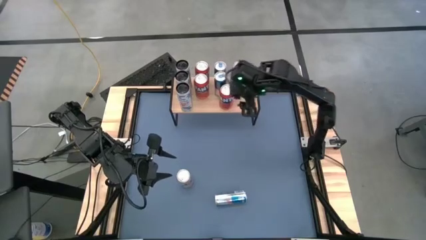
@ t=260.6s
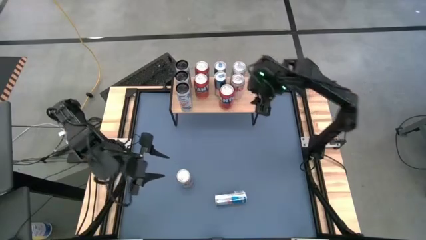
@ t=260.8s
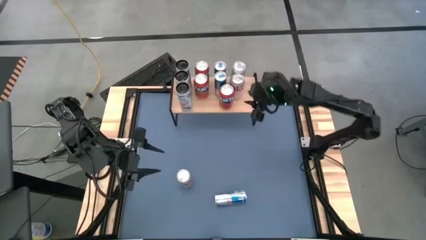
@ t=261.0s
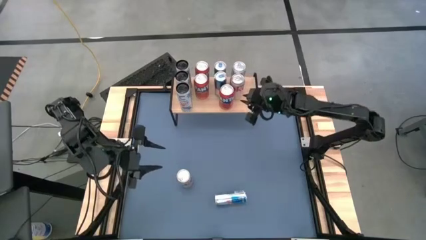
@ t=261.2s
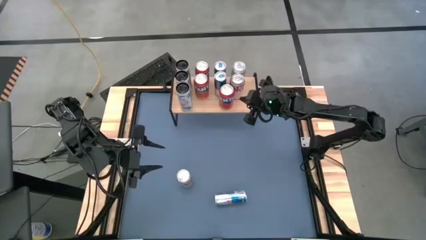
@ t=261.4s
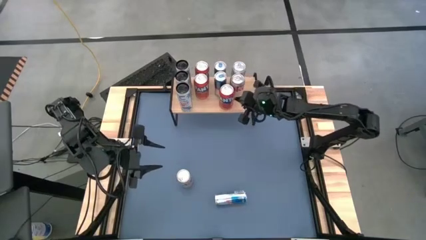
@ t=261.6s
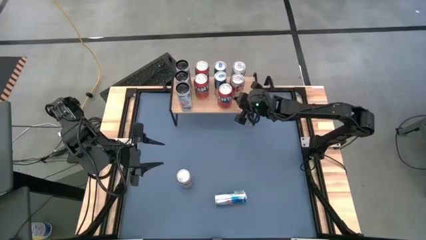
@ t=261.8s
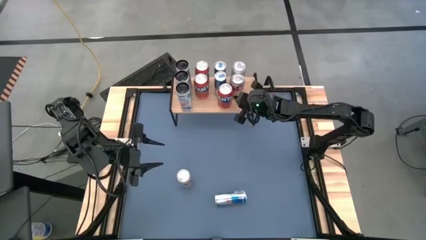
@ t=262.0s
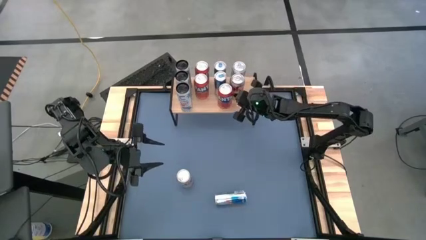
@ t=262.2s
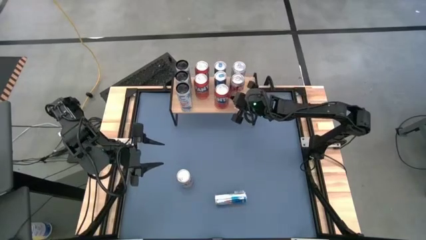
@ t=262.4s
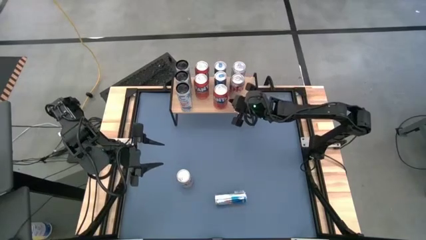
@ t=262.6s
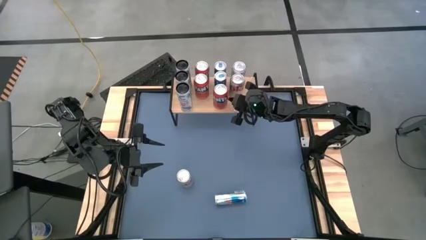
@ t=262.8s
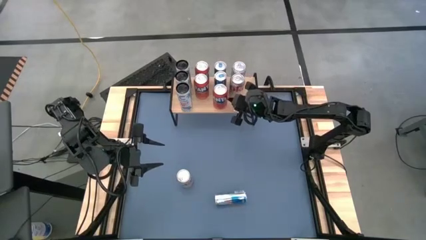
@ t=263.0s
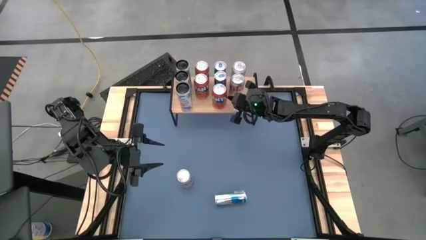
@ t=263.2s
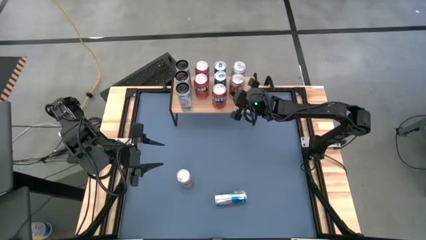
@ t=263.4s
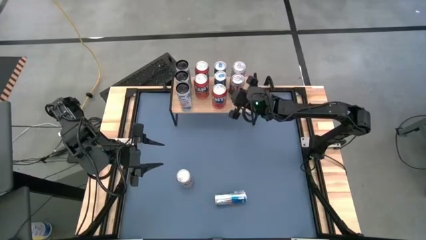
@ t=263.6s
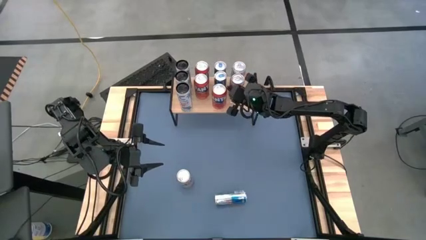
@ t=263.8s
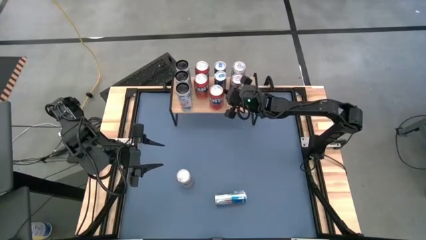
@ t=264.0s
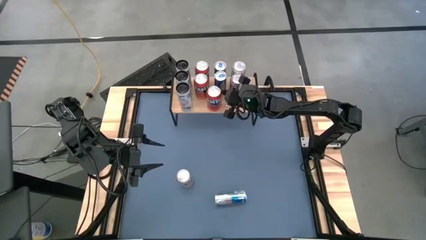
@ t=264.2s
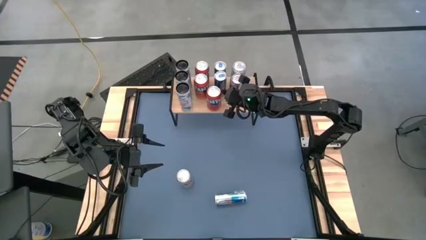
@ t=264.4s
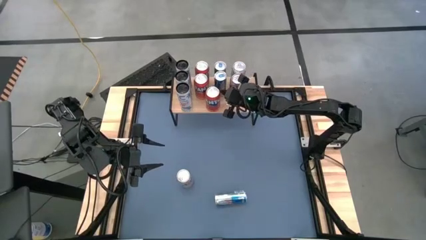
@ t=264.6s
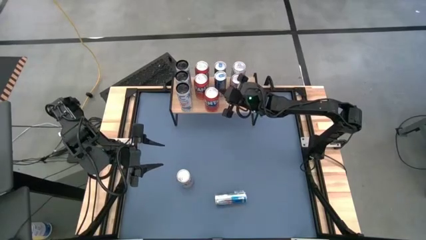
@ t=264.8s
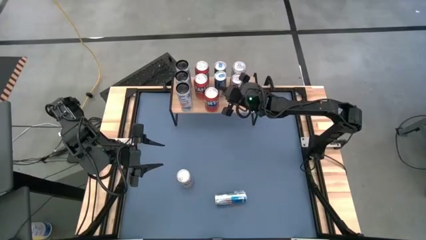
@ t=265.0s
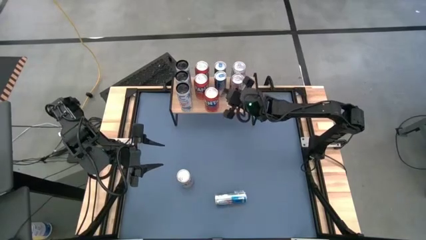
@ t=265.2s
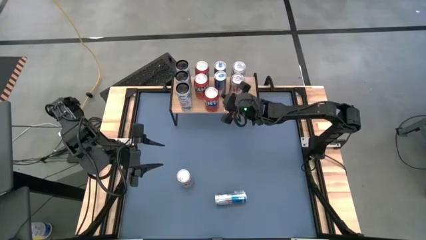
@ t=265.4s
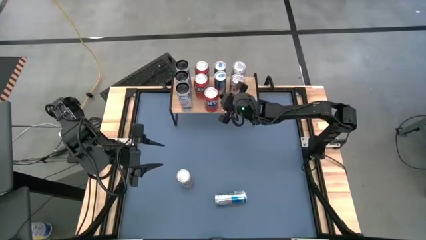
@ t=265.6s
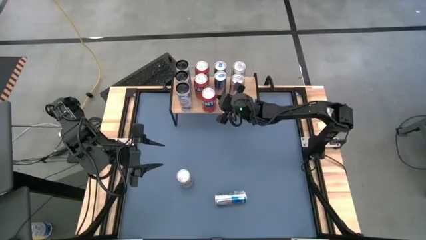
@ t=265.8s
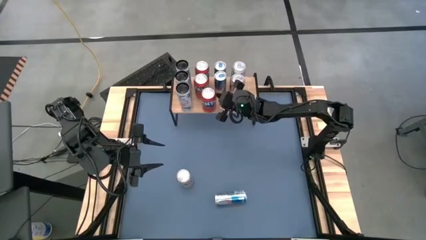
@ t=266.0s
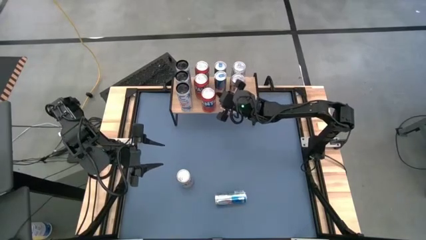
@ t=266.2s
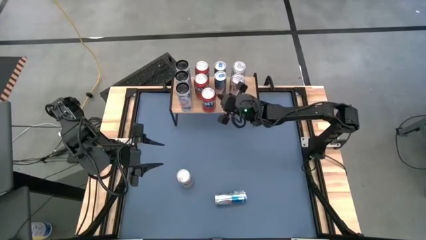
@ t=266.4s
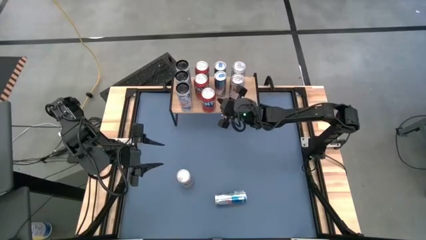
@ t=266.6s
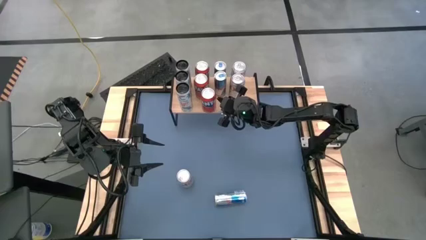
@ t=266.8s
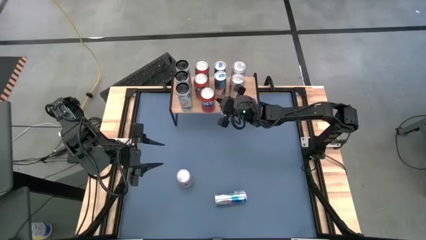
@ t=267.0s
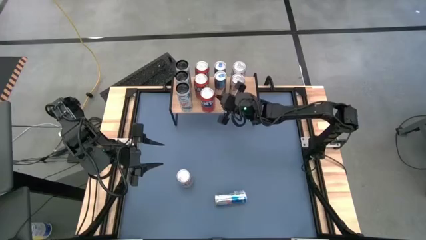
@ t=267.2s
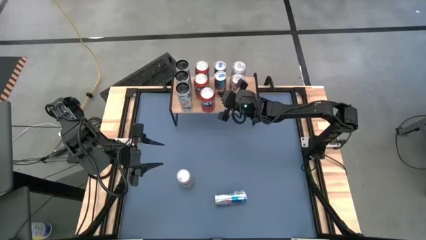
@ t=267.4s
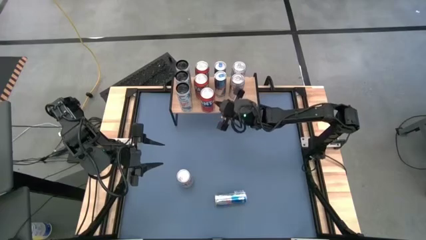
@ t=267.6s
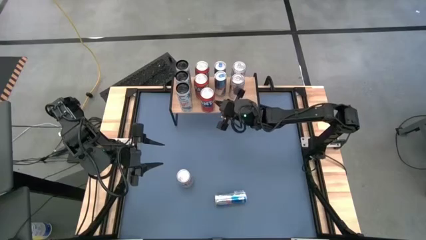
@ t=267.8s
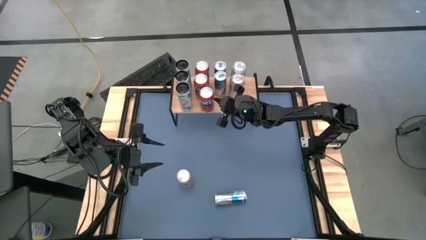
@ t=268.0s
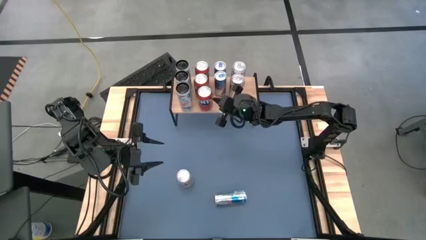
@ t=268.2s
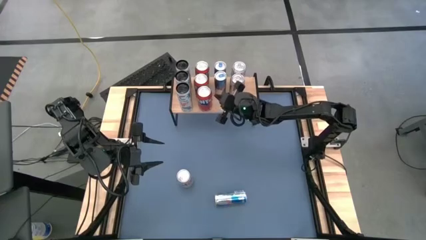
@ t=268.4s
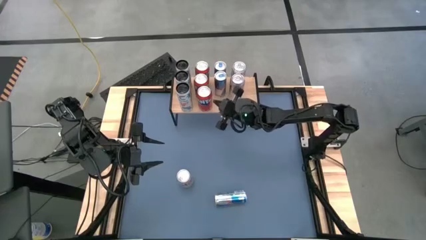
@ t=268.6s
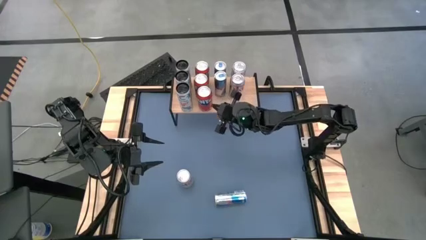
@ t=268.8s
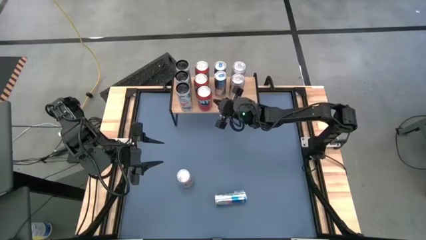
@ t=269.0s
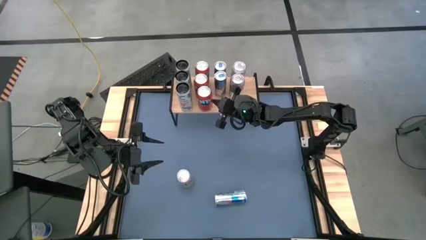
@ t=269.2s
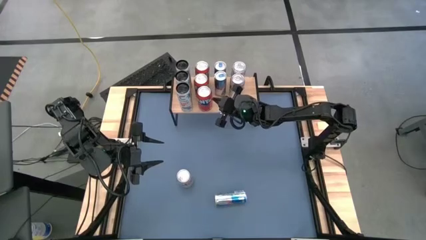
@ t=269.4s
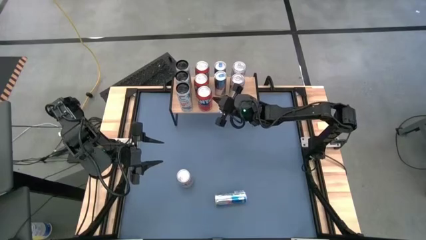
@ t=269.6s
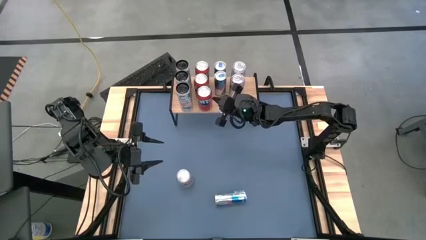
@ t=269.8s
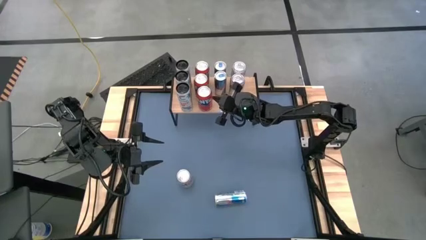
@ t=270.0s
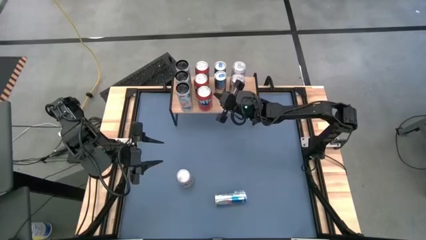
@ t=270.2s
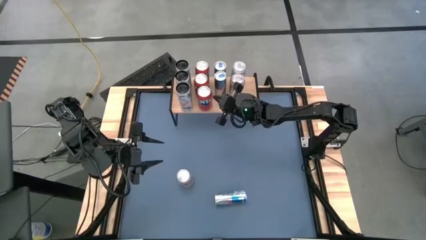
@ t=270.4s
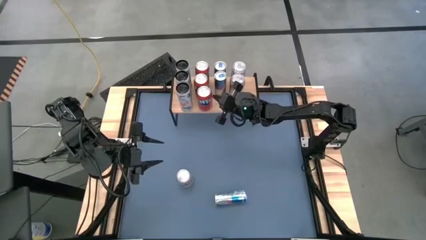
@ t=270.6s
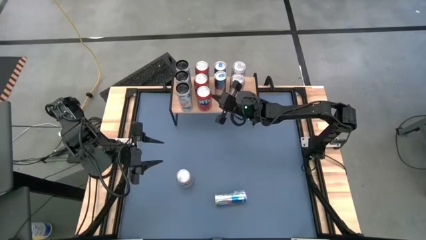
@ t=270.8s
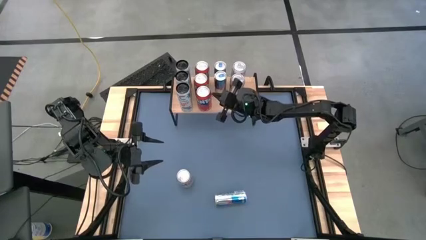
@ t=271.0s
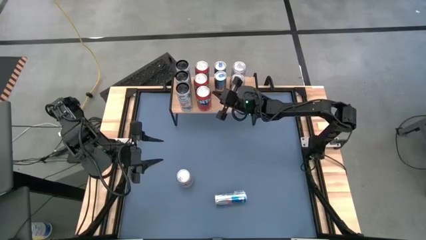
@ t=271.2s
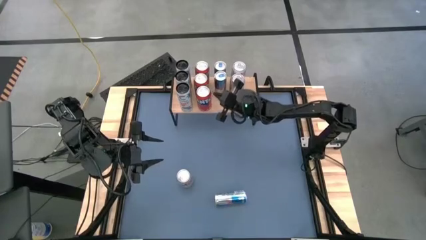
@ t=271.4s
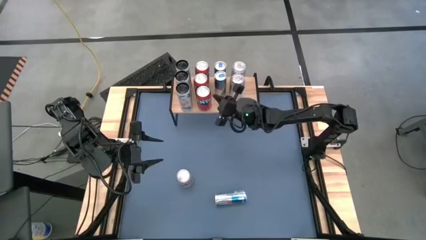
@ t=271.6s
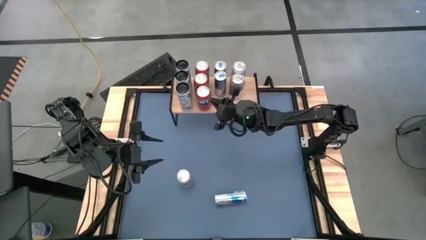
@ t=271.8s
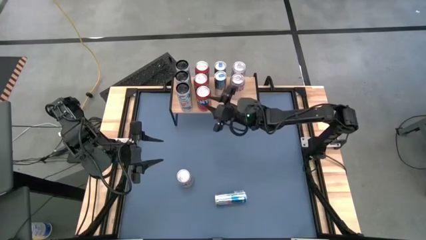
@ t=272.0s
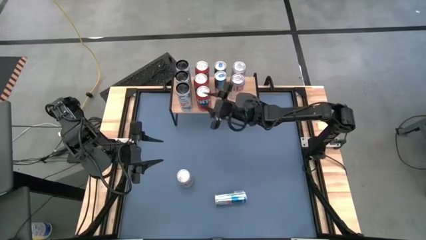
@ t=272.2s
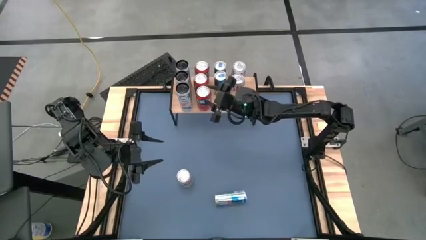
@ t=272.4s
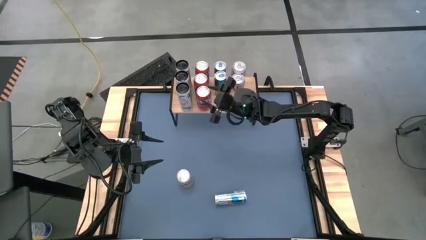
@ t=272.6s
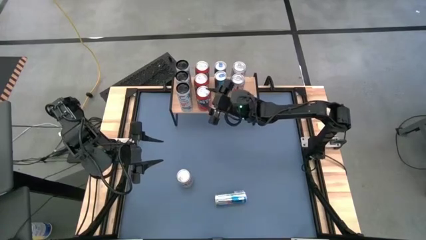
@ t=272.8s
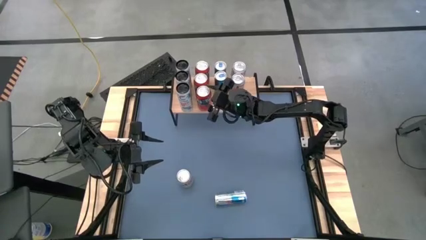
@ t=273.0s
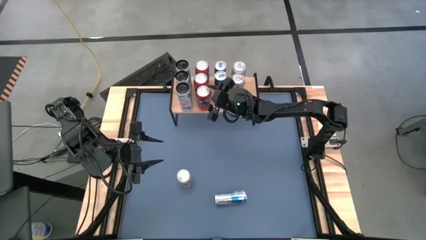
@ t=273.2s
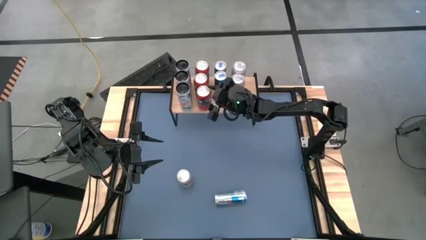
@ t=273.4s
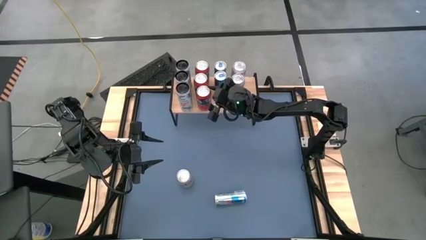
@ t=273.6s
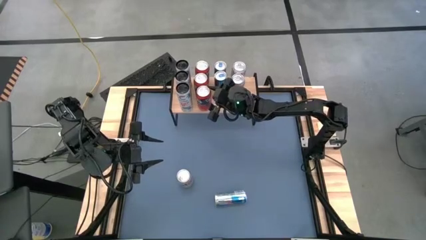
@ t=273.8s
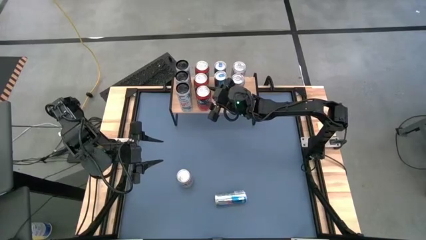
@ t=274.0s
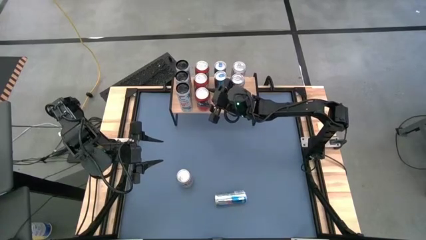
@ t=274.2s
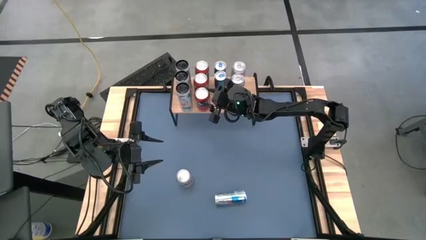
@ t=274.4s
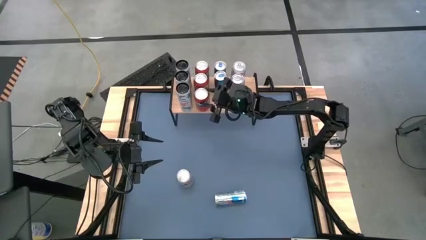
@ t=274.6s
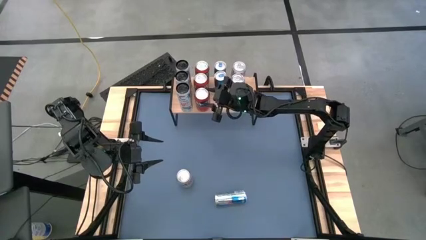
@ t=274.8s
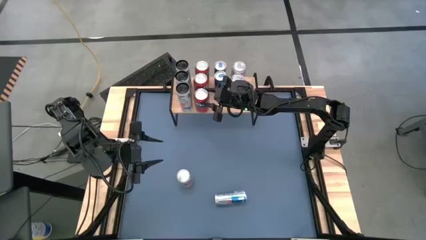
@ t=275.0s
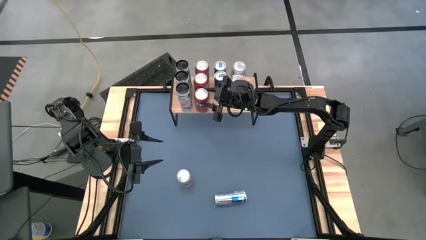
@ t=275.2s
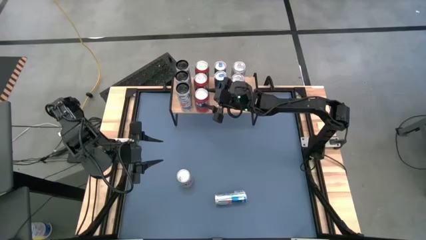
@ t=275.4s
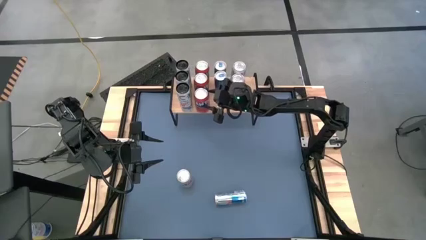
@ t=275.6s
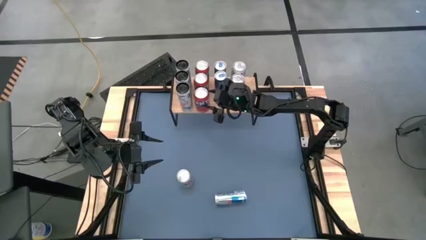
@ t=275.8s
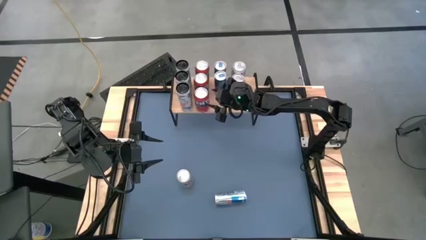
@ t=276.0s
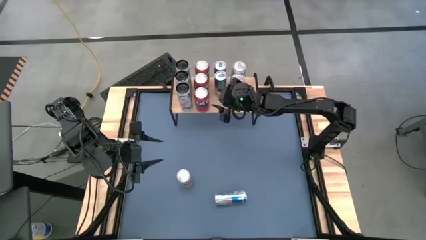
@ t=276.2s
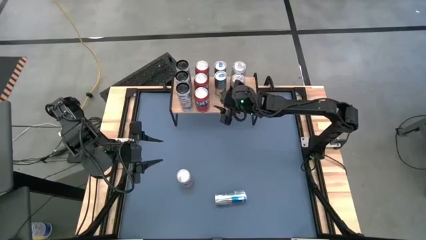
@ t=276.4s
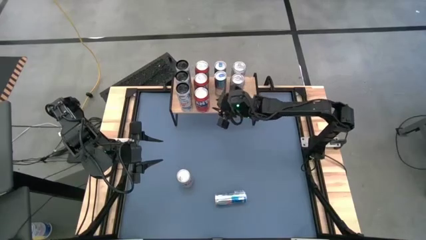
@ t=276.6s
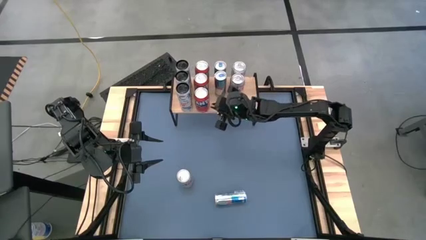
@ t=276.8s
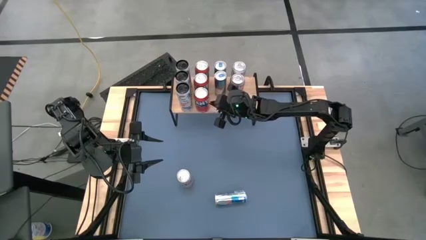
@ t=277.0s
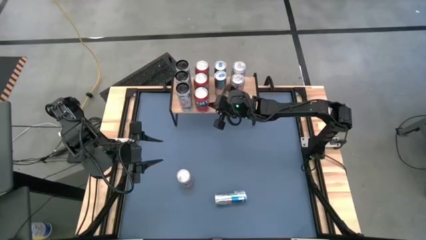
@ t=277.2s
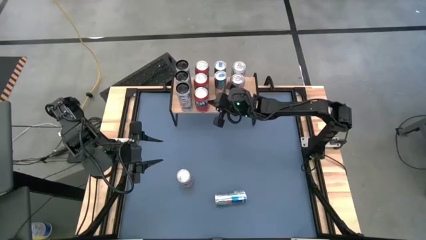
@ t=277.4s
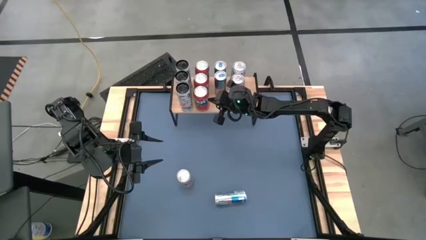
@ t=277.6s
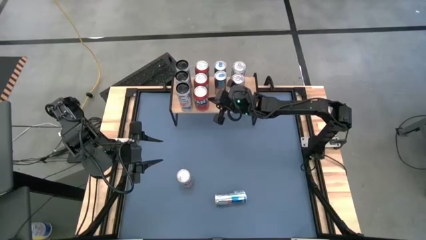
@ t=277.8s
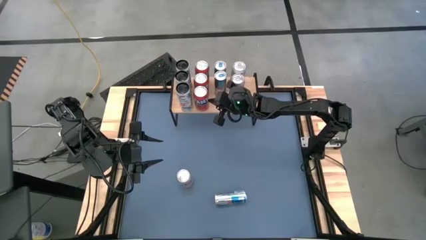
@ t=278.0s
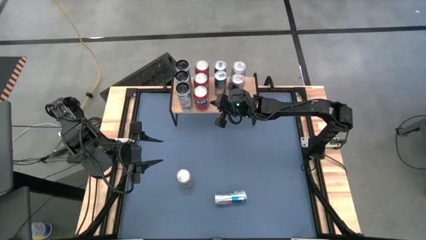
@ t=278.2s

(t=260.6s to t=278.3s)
Task: Place canned beverage on shelf
Adjust the orange soda can
